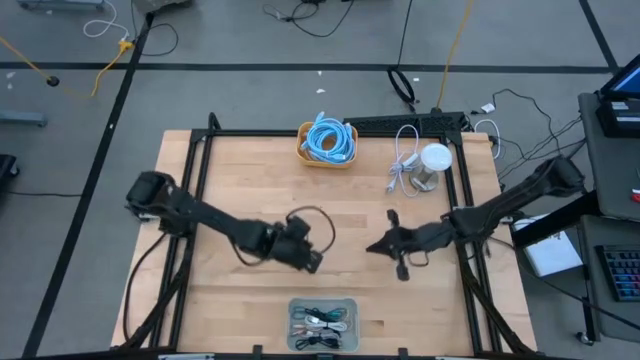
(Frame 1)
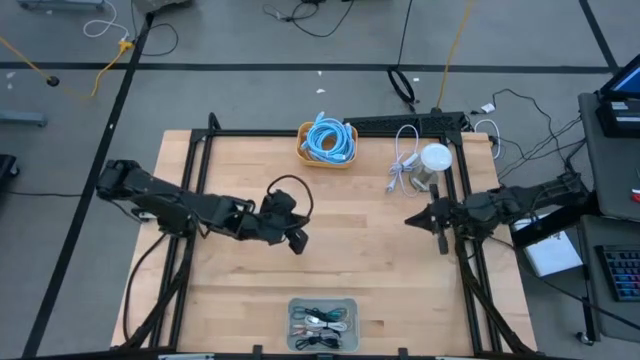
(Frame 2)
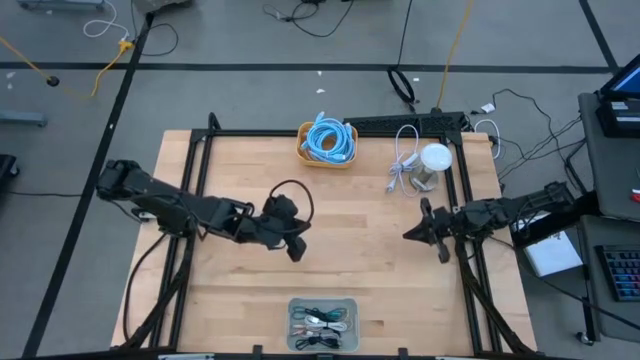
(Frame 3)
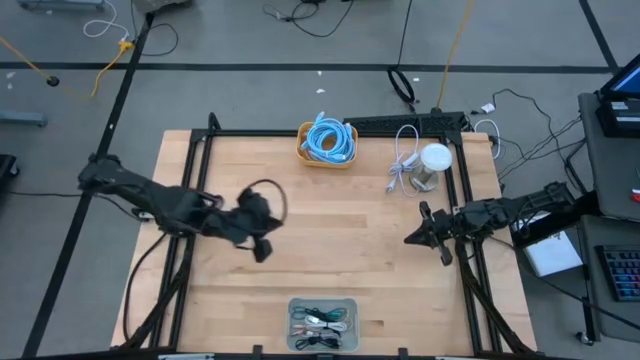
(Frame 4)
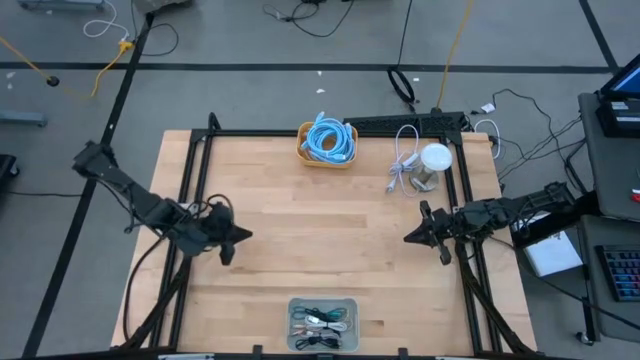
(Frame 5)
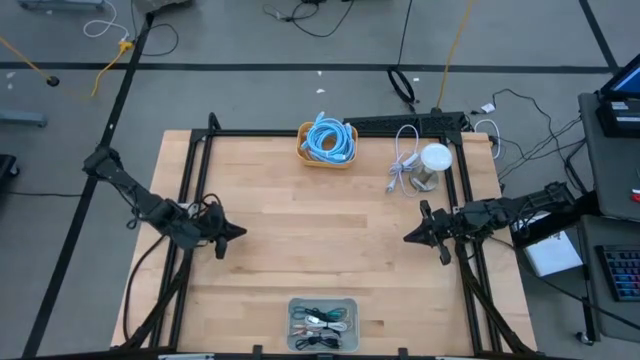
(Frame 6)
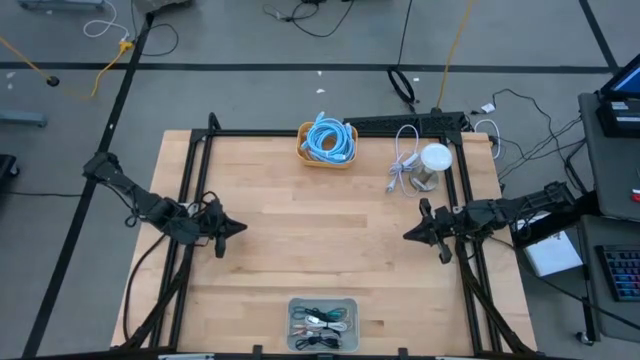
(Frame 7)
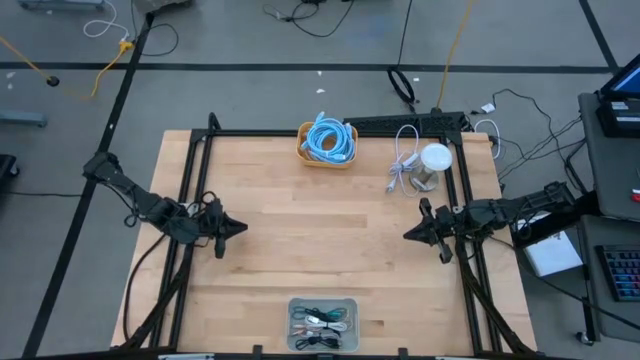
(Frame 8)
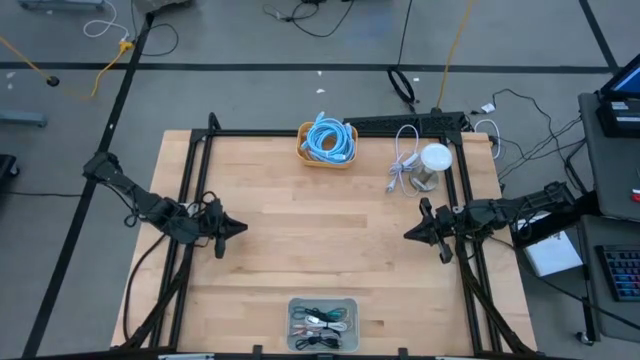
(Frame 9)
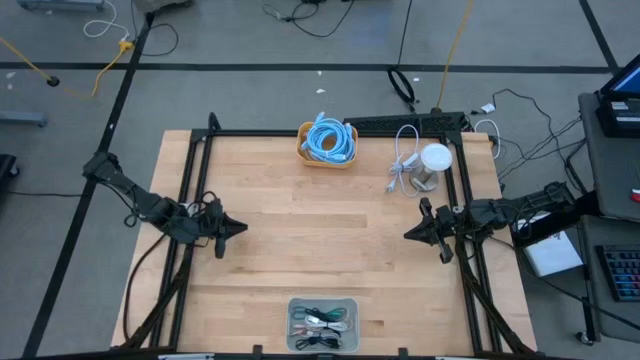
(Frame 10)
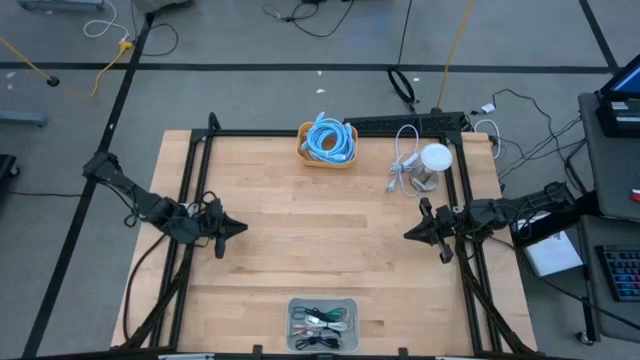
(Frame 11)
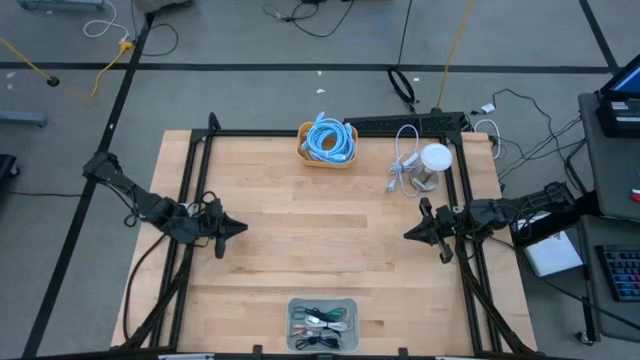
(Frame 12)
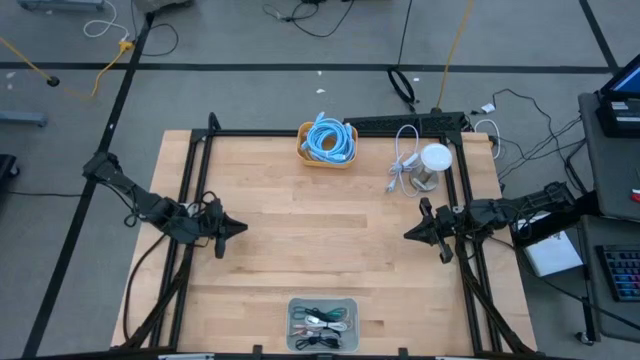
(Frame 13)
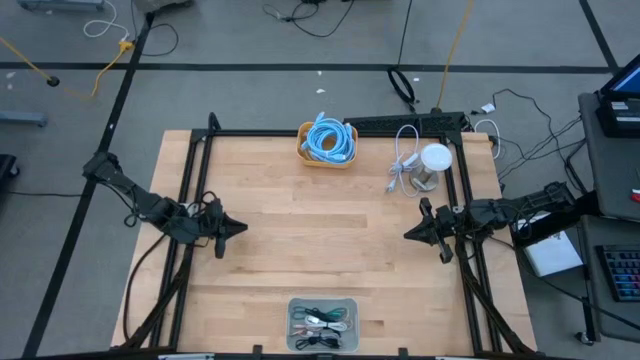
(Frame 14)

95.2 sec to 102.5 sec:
Task: Pick & Place USB Port
Return to Home Position

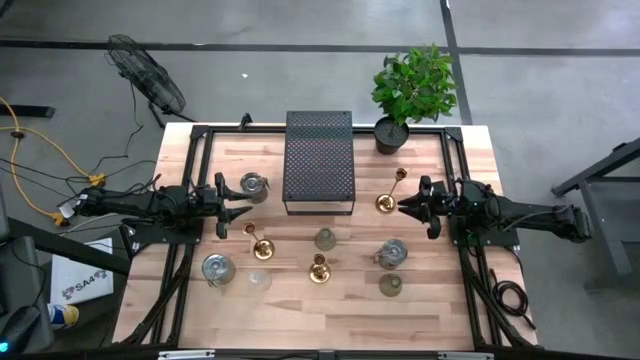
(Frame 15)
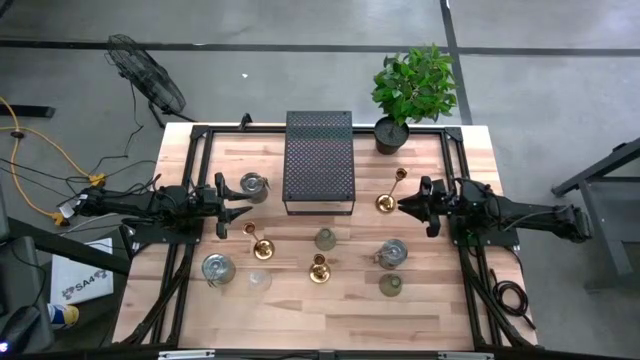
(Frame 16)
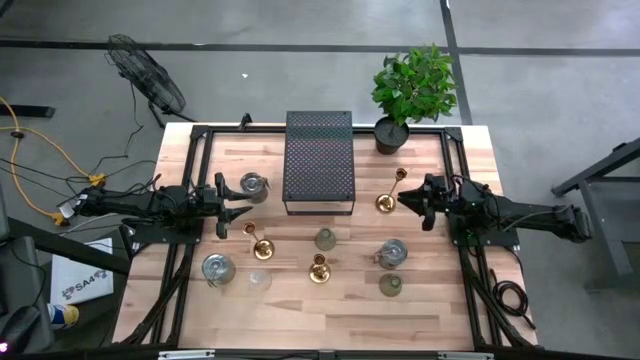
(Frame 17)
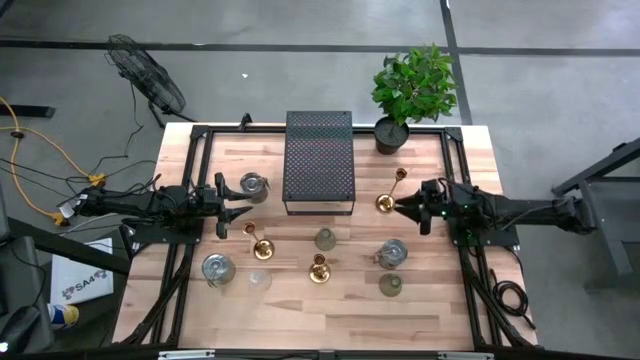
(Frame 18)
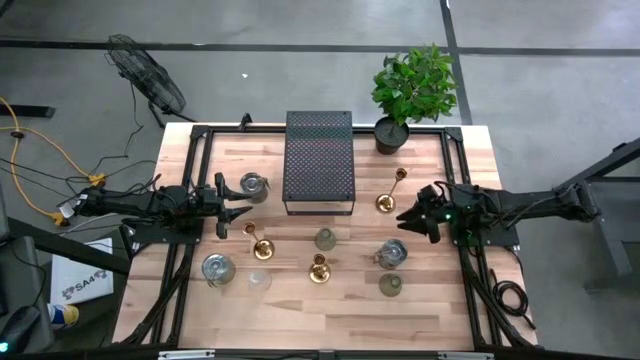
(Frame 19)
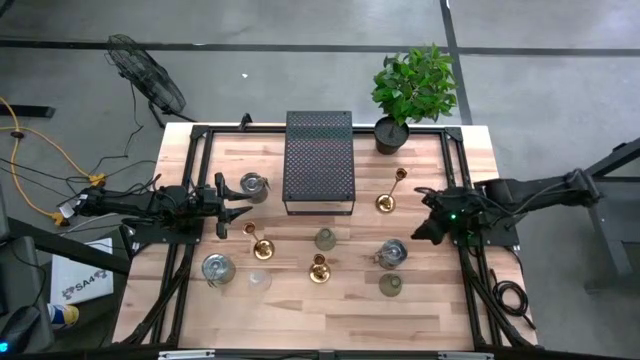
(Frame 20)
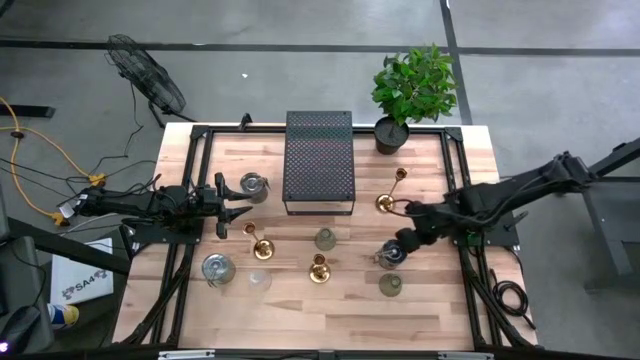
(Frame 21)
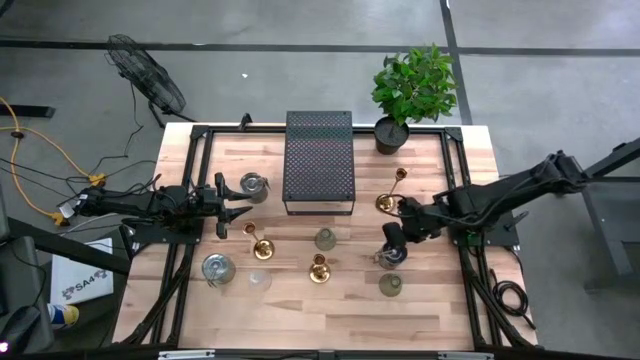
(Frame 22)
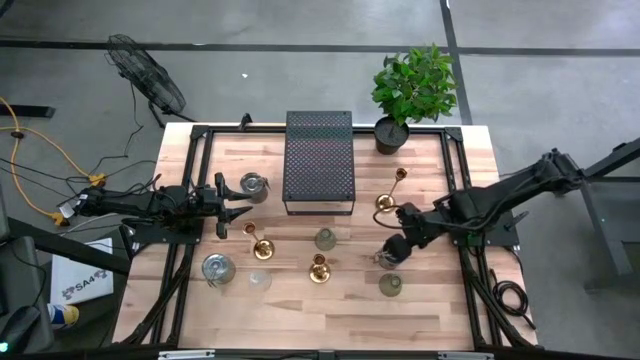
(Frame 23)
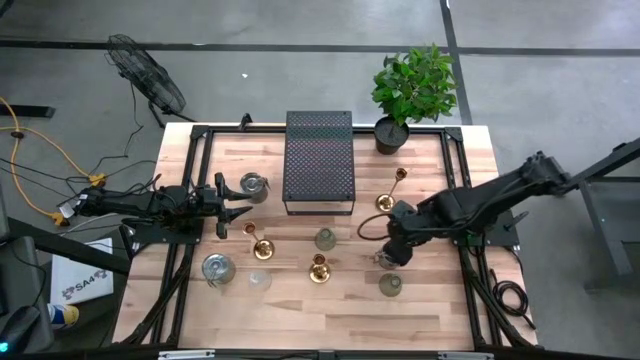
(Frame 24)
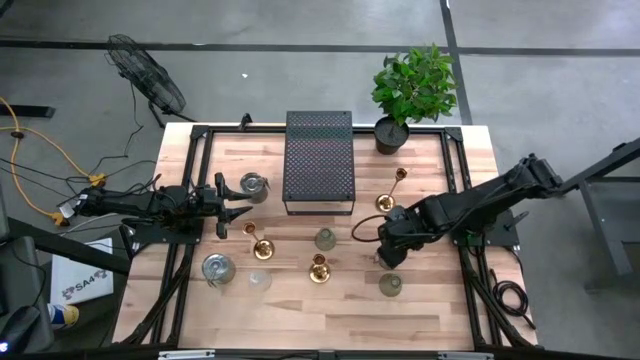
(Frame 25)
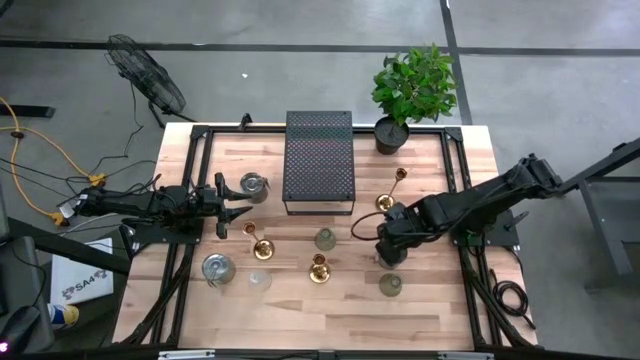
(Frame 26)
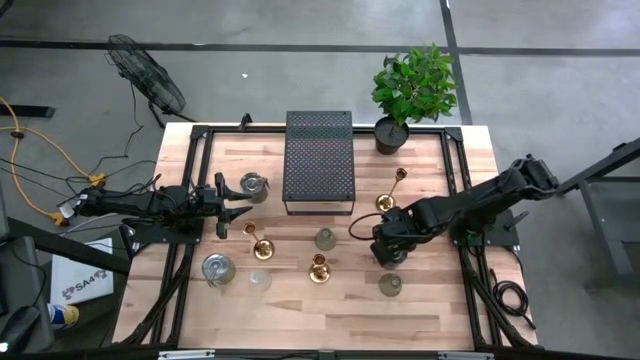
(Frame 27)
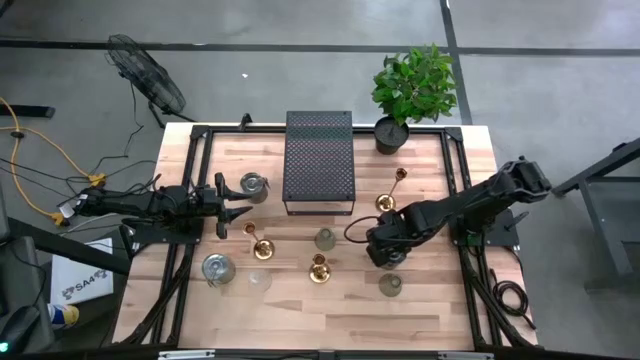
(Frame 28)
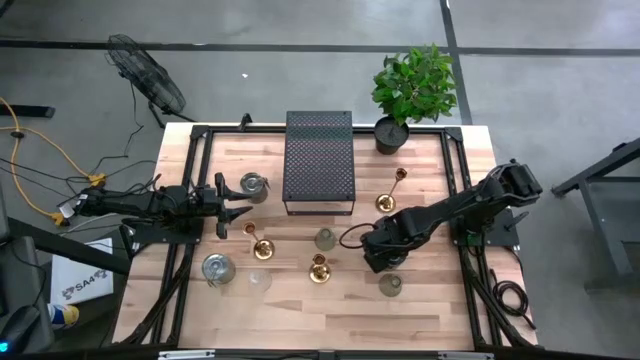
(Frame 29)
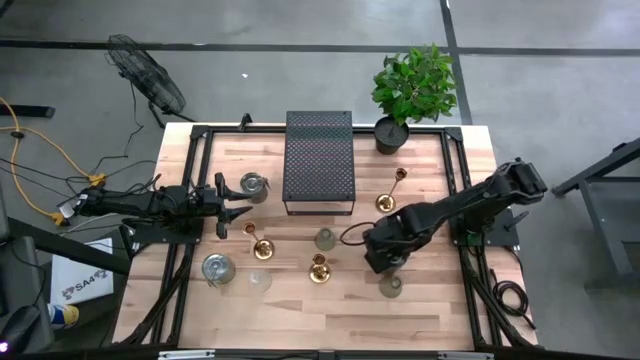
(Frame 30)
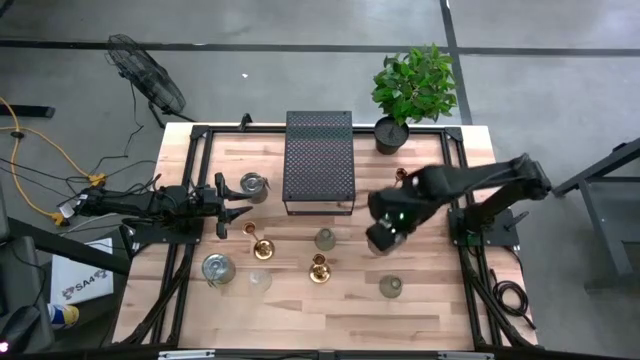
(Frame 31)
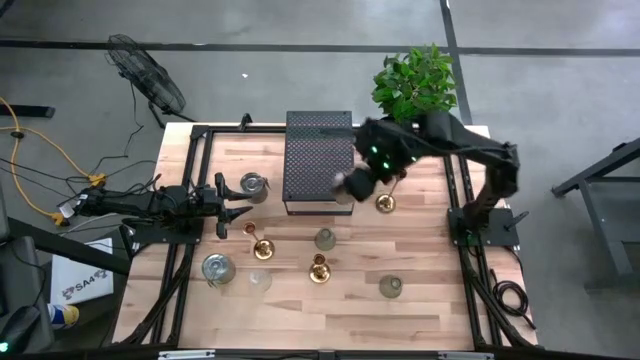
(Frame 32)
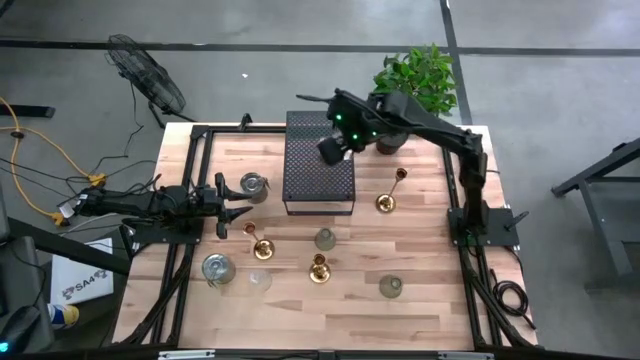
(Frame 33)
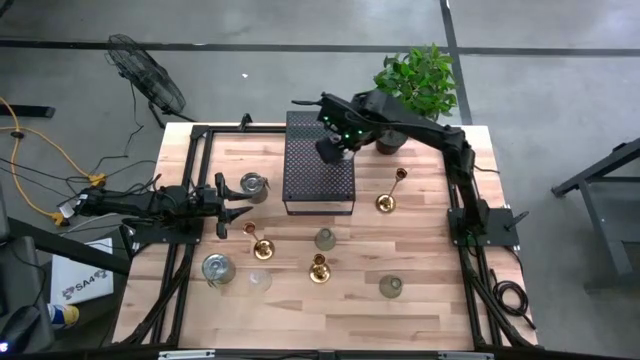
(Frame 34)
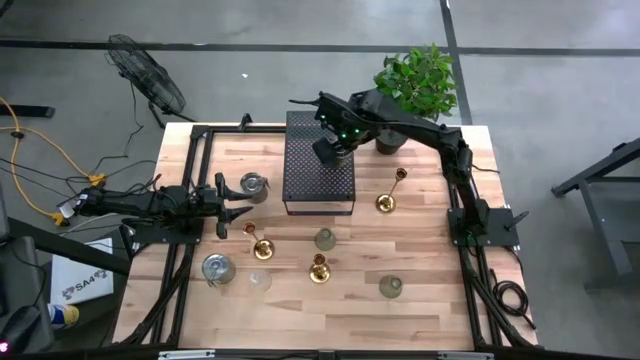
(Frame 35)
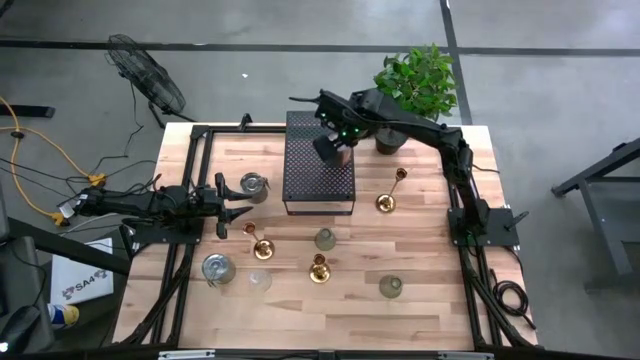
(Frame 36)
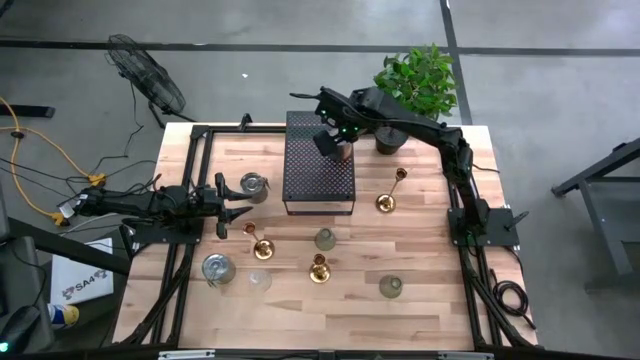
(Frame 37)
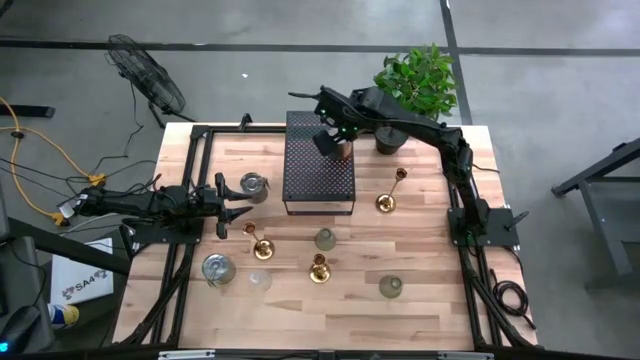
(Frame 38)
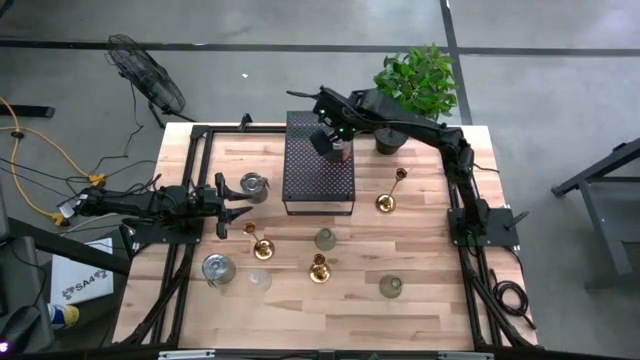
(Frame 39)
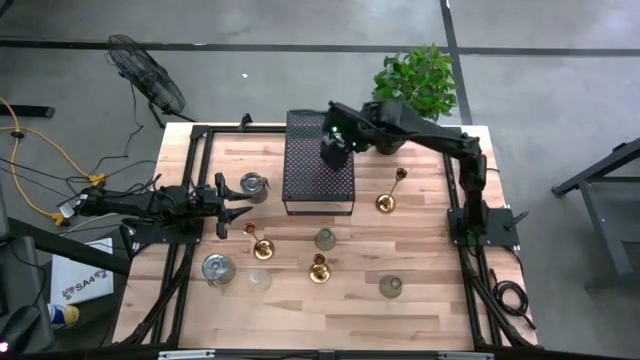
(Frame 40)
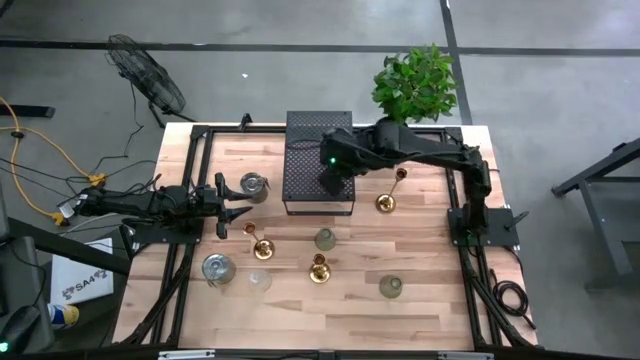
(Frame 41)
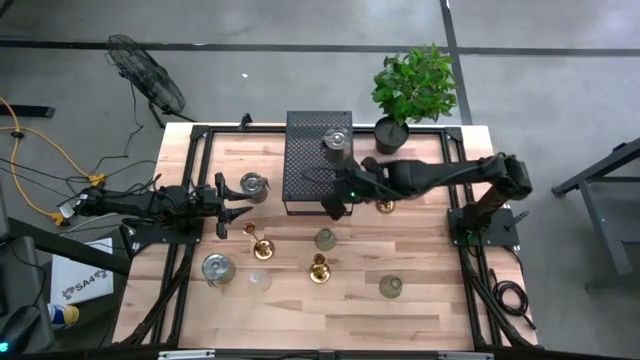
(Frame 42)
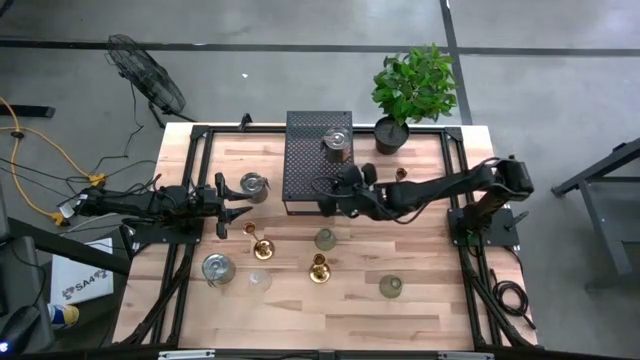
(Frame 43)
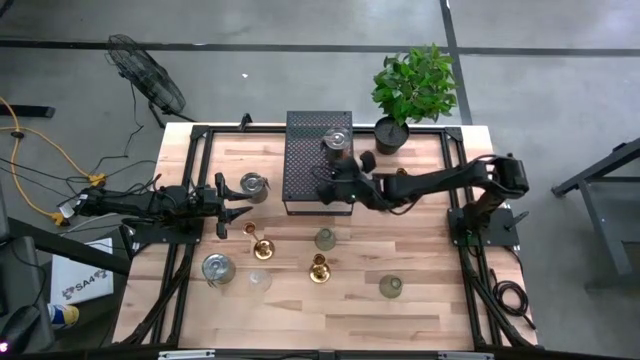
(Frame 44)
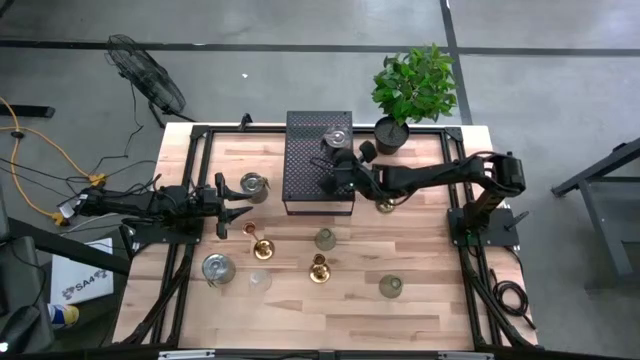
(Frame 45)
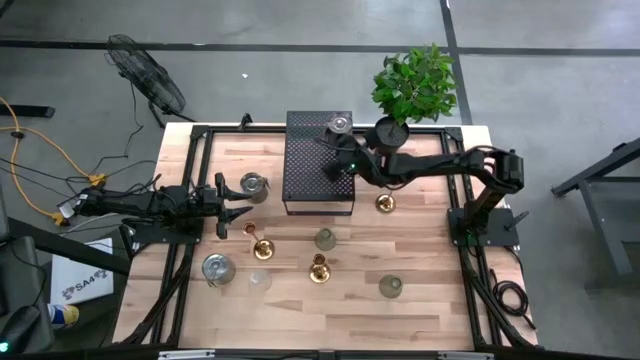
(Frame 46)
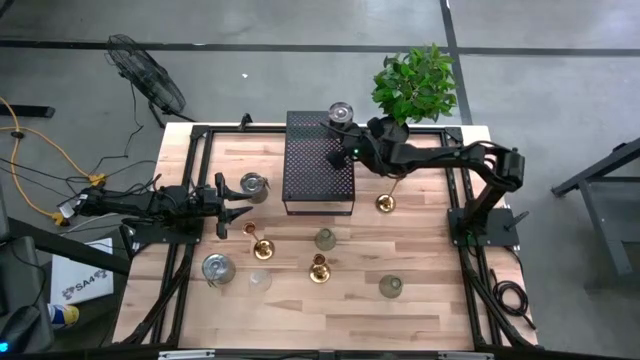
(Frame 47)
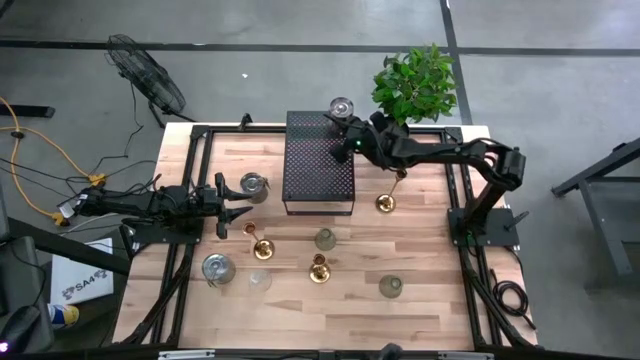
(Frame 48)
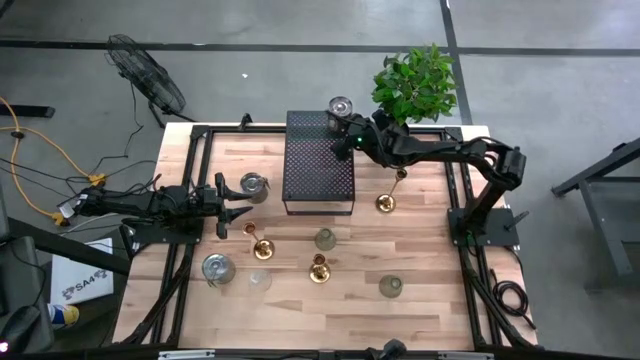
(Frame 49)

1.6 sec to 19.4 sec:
Task: Pick & Place candle stick holders
Put the bottom right silver scented candle on the shelf
